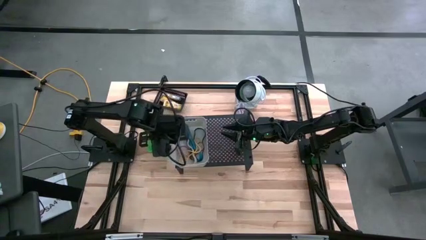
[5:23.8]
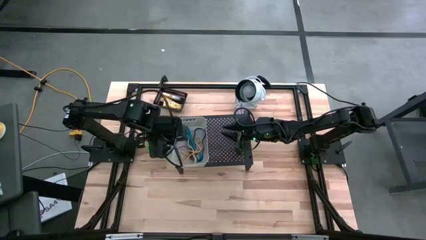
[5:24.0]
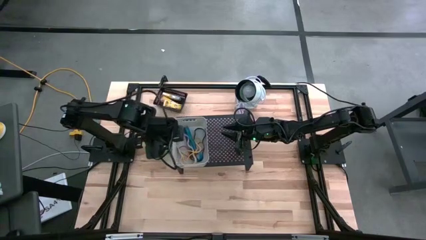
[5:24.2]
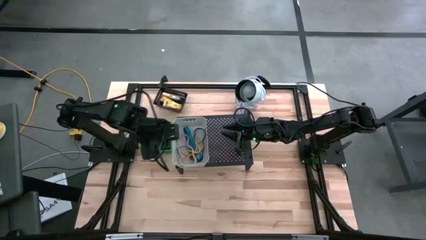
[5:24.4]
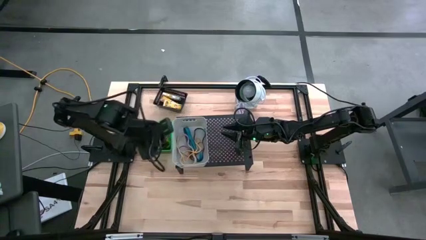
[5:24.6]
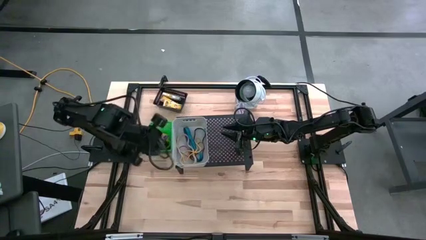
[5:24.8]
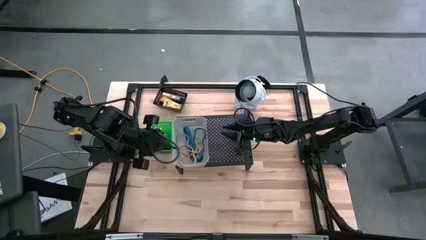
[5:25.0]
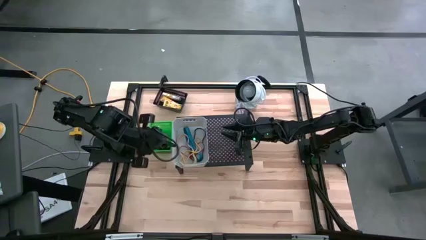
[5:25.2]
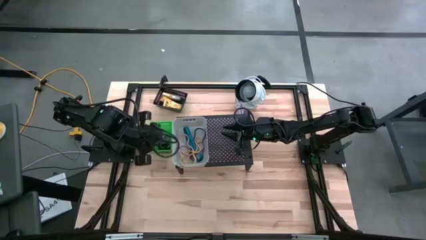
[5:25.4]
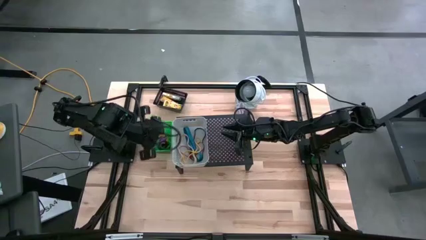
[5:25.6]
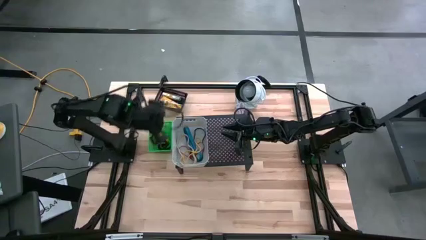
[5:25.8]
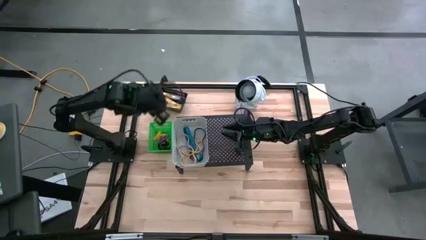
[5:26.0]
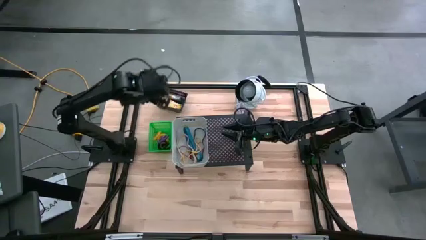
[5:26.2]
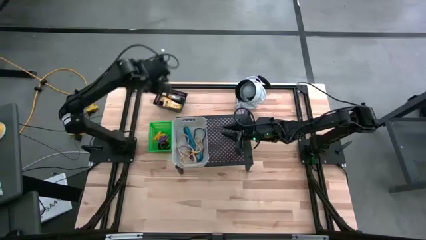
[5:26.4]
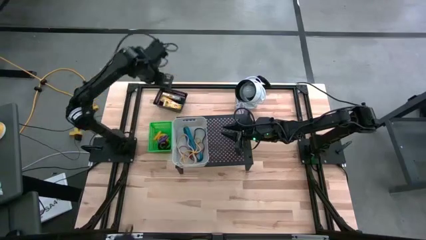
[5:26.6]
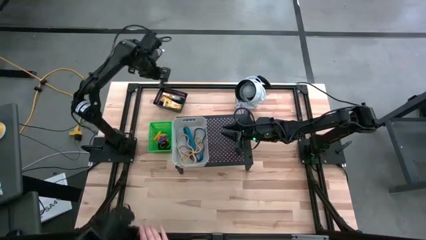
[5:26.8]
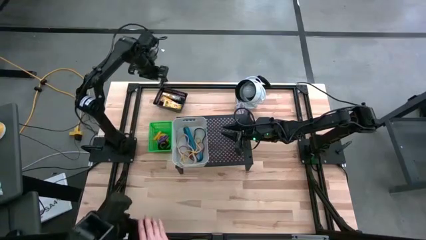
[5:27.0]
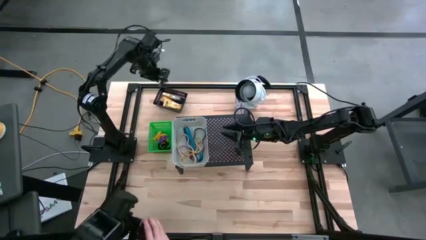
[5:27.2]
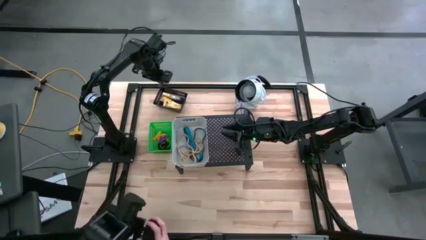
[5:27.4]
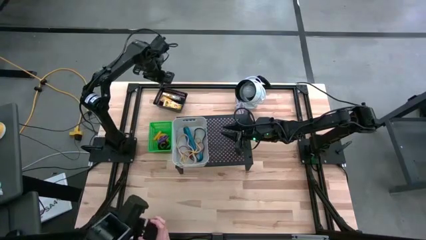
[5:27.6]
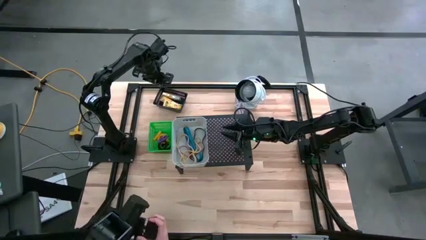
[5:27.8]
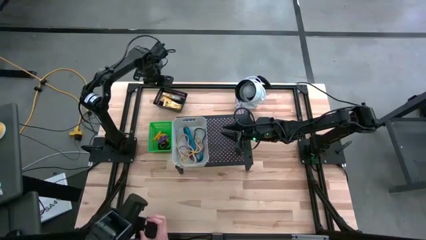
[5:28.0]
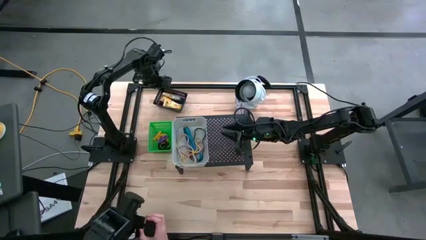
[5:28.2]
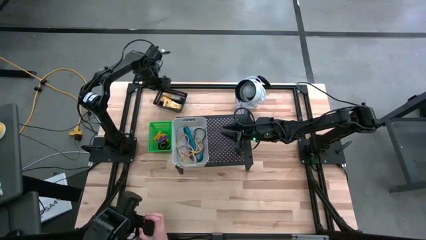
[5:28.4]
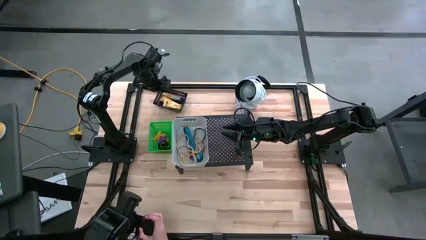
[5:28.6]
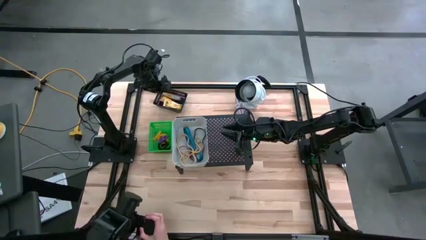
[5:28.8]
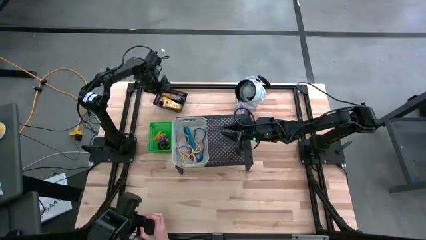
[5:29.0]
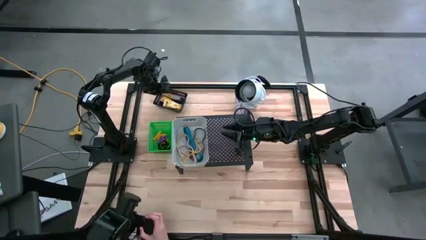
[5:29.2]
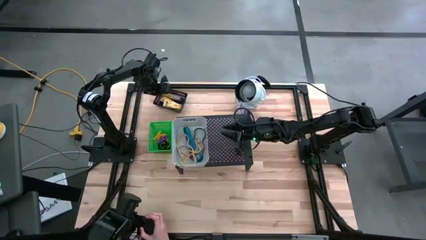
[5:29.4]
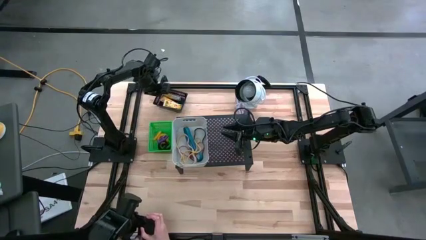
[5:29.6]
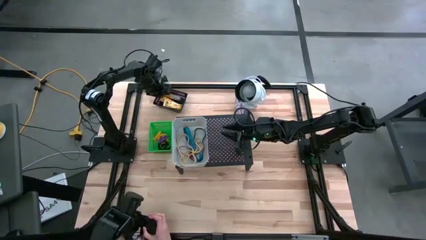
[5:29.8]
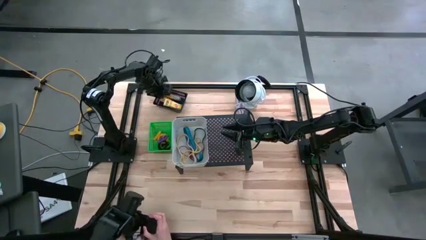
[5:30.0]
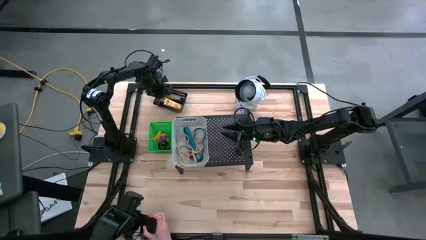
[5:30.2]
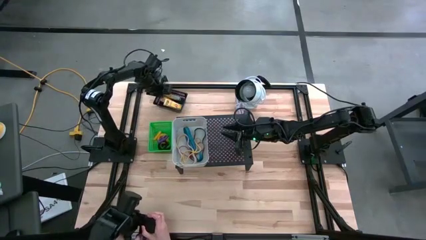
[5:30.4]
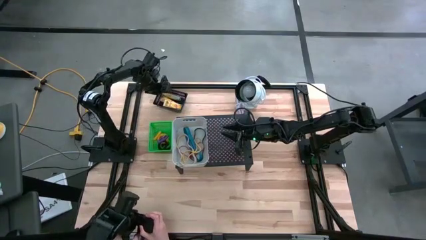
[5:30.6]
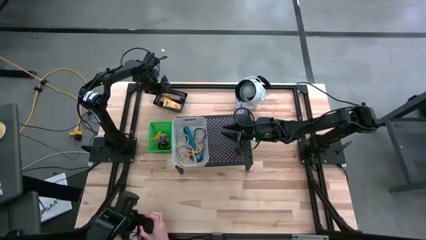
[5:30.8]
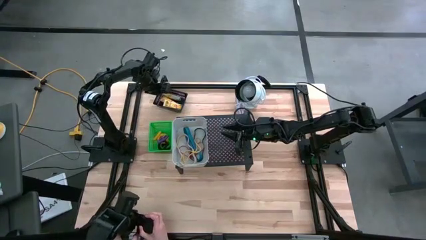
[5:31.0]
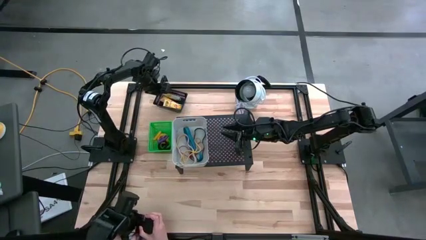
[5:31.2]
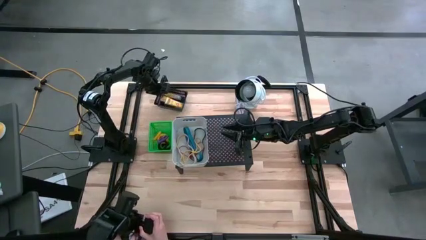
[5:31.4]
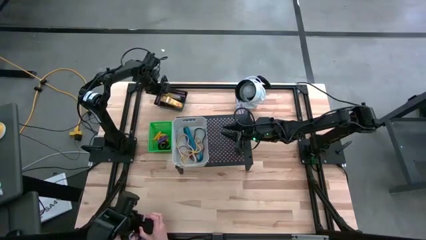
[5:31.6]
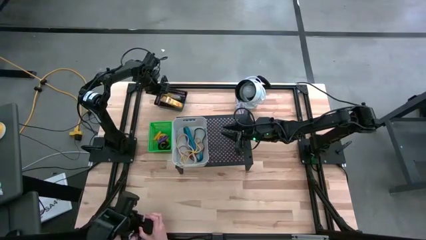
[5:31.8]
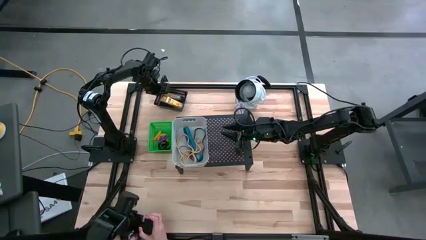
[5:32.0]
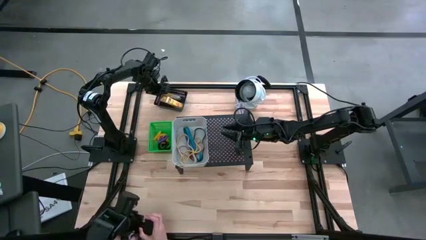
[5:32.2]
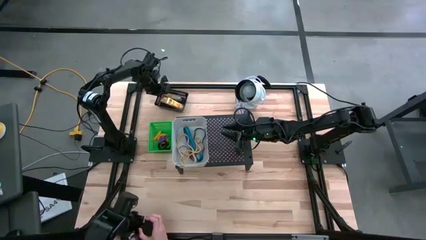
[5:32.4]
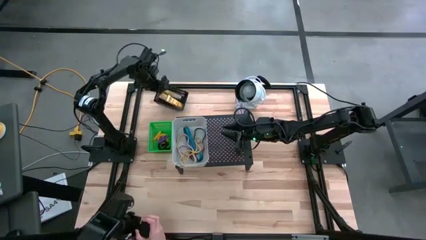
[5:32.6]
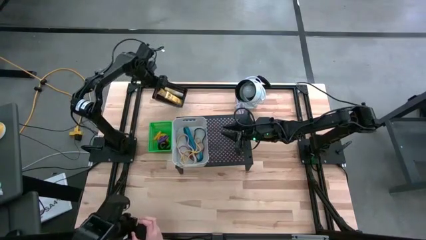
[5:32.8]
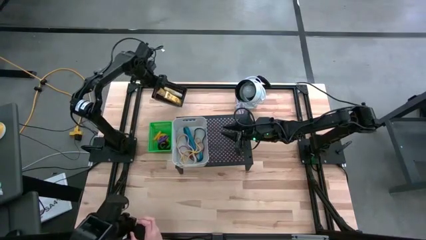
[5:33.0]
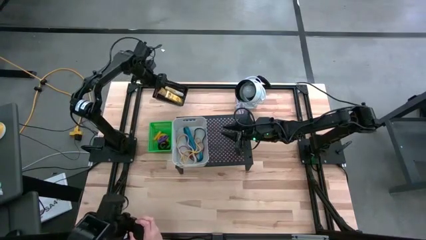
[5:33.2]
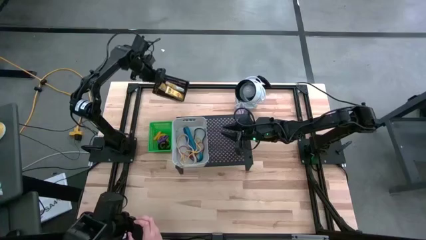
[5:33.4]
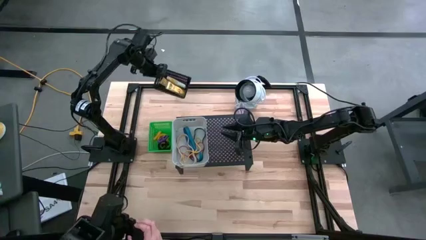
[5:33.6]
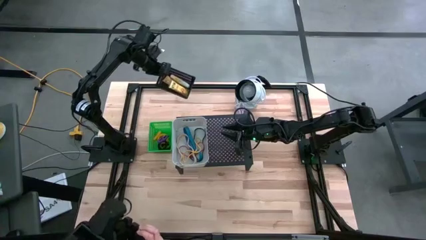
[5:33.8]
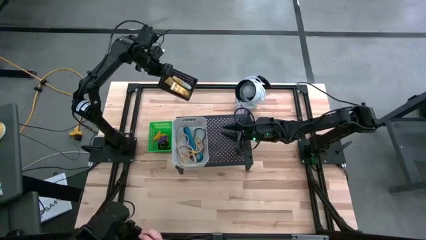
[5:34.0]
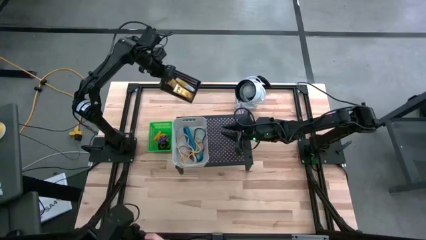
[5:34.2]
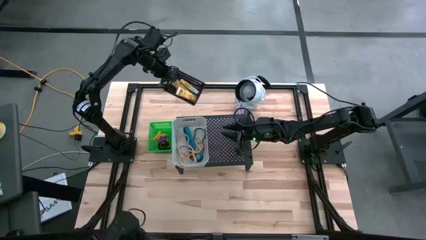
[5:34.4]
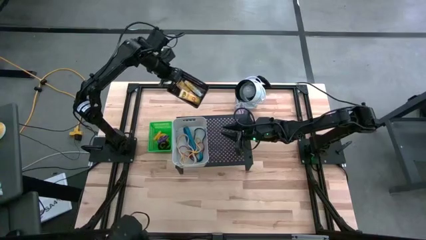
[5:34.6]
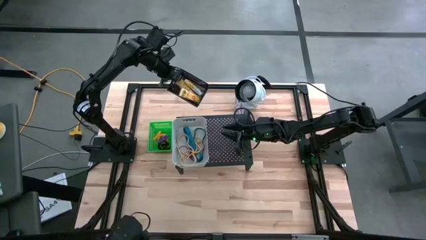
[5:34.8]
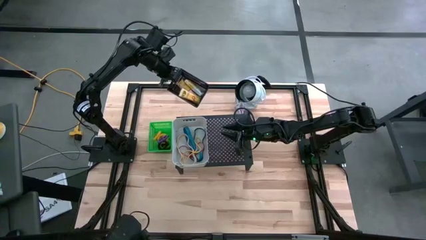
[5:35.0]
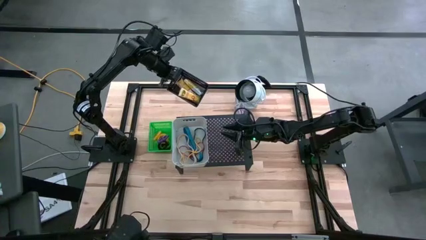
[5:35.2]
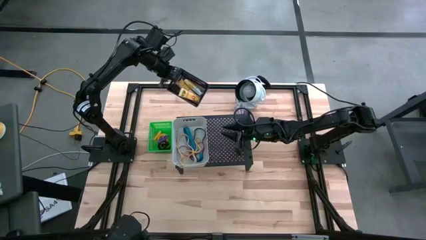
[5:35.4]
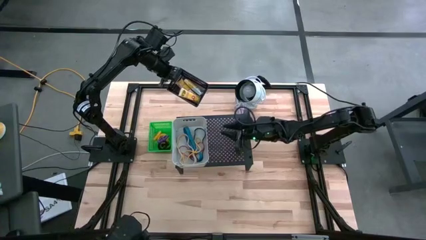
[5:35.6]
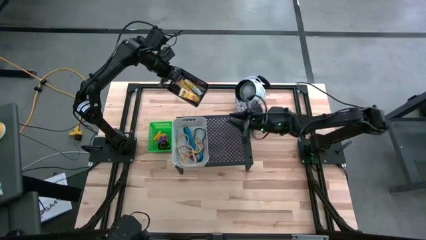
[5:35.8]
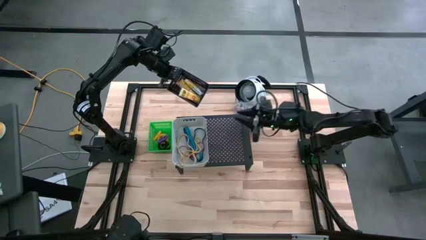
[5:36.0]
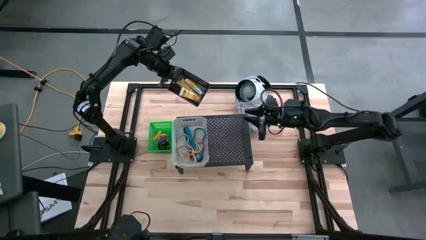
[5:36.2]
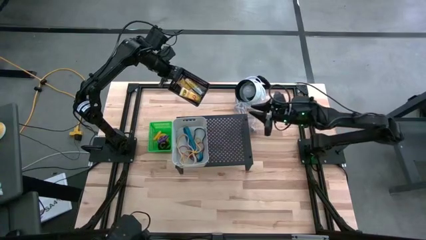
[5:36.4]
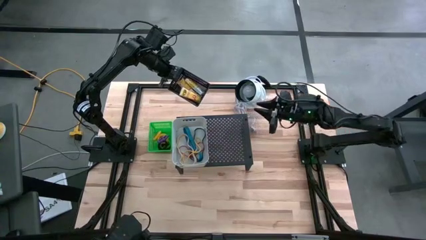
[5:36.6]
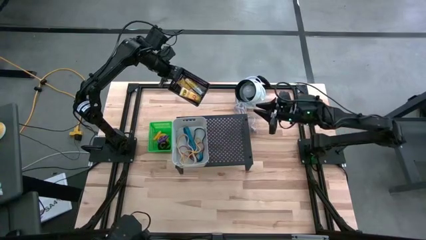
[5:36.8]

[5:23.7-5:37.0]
Task: Pick & Place Office Desk Supplies
Put the black bin with the crayon boxes on the shelf

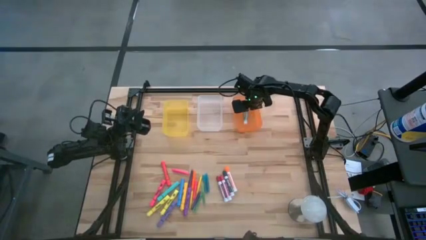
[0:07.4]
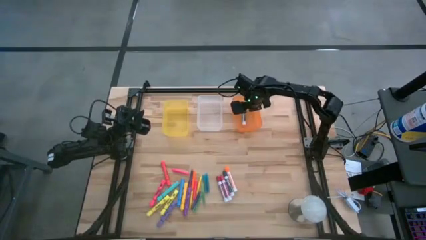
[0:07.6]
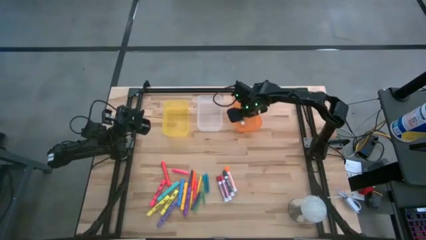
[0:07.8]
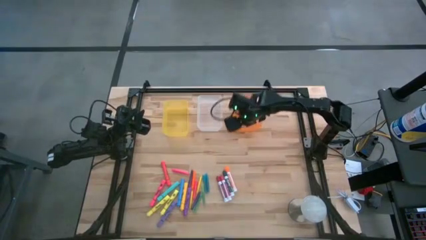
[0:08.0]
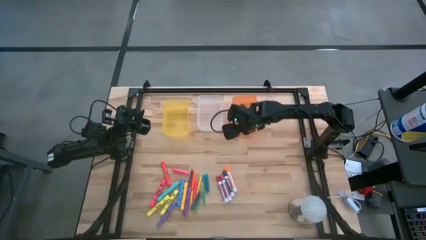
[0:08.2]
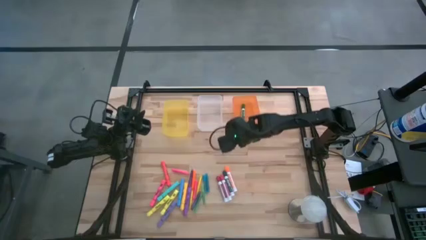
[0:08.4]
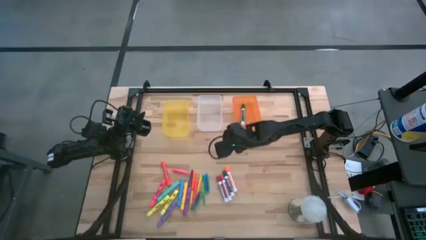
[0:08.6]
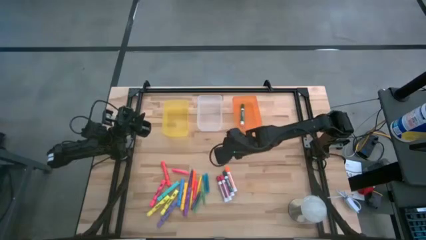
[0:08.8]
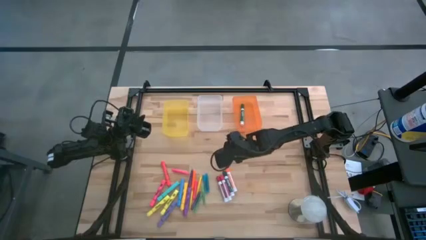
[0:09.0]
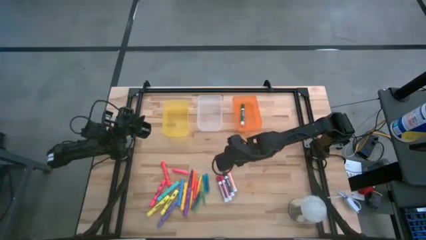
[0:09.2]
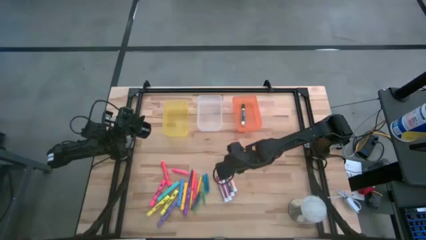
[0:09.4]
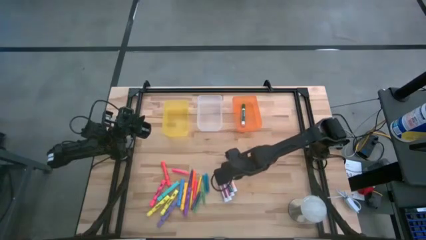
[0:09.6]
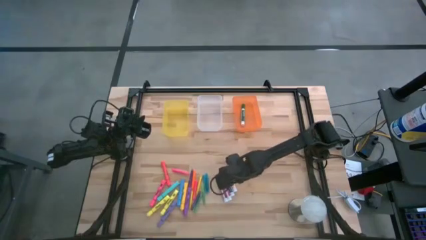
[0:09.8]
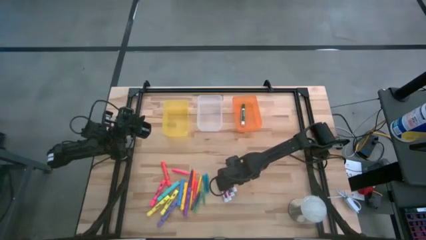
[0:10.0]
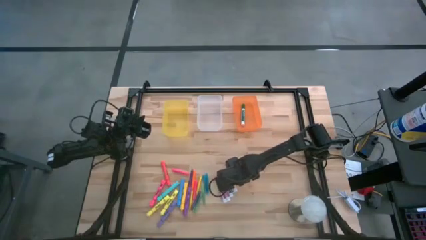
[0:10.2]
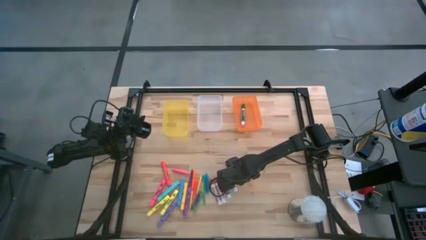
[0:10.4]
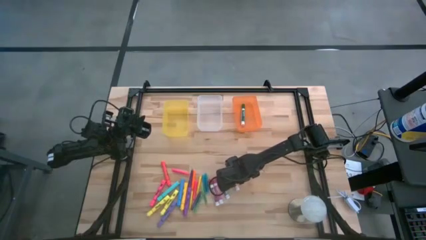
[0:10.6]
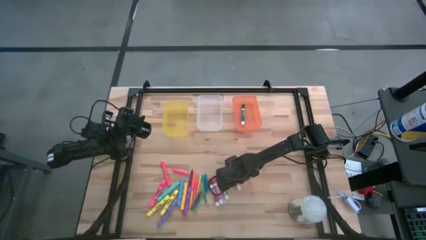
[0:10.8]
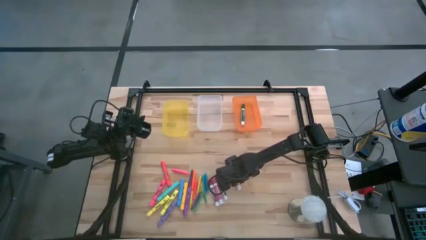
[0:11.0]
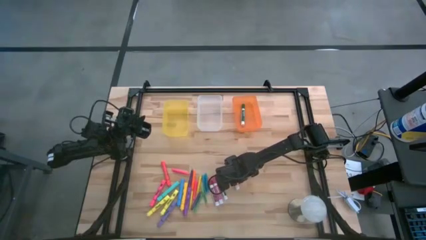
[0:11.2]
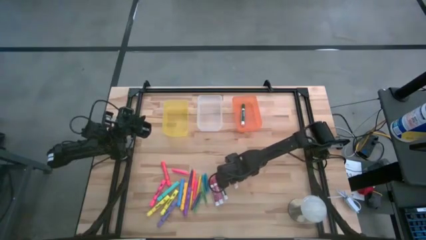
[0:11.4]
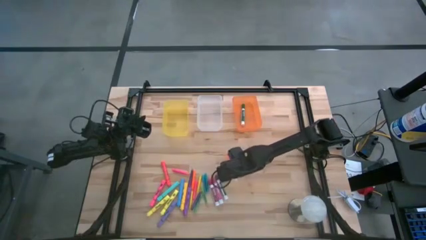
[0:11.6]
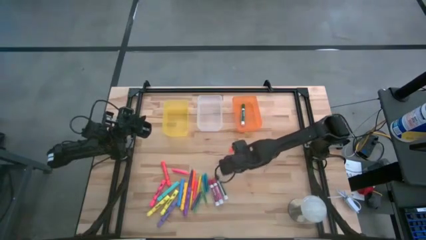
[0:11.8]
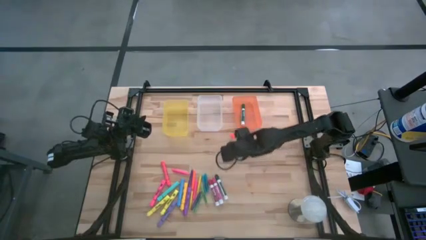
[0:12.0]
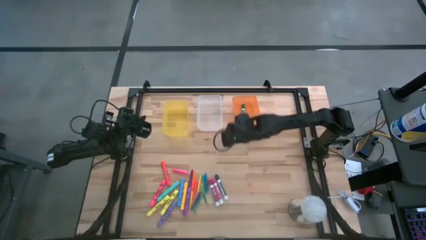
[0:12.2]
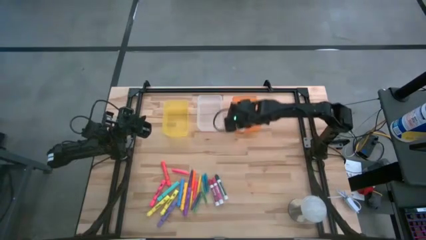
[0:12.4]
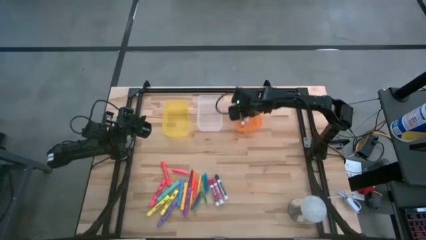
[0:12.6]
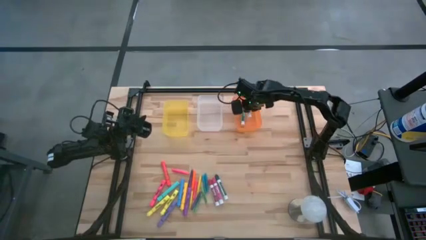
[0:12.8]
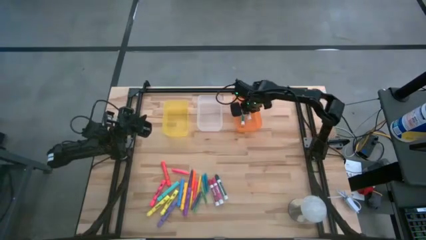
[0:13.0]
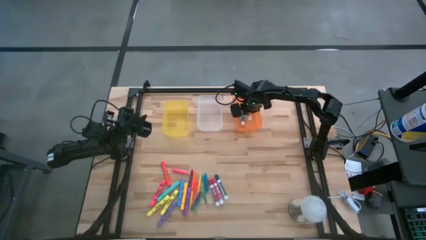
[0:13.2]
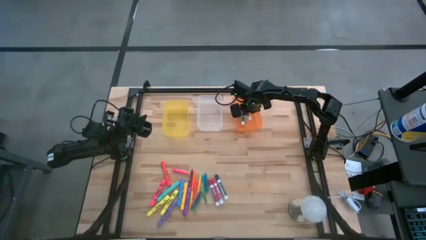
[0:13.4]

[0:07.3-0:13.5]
Task: Pick & Place Markers
Put the orange marker pen into the orange bin
